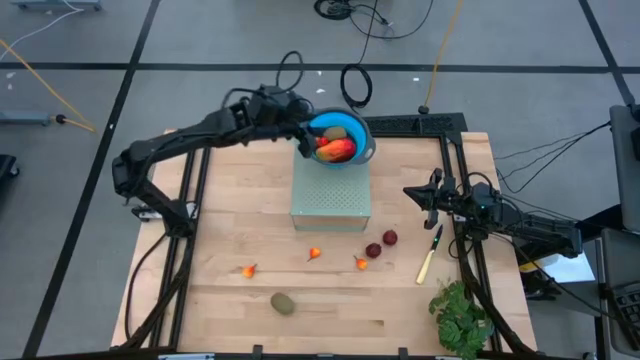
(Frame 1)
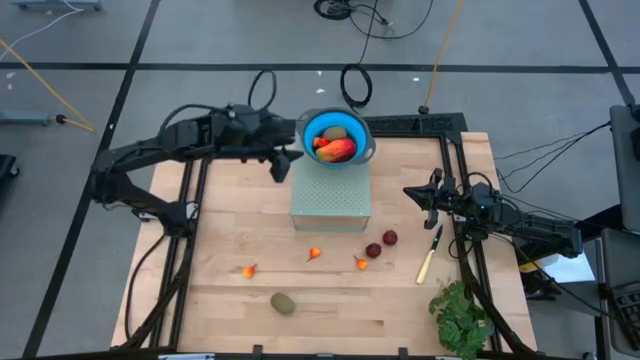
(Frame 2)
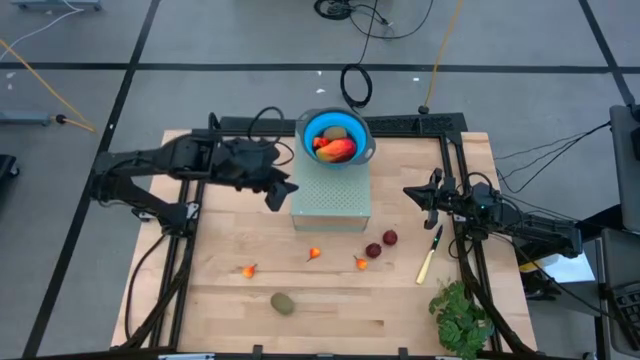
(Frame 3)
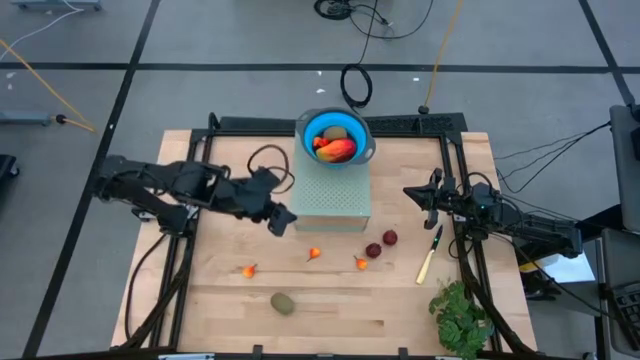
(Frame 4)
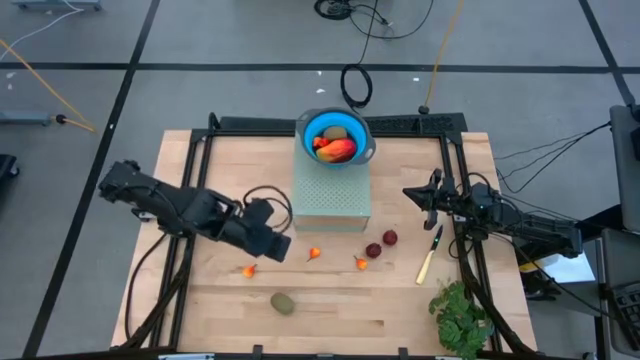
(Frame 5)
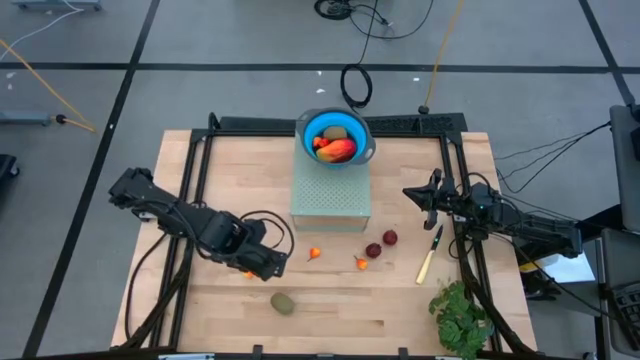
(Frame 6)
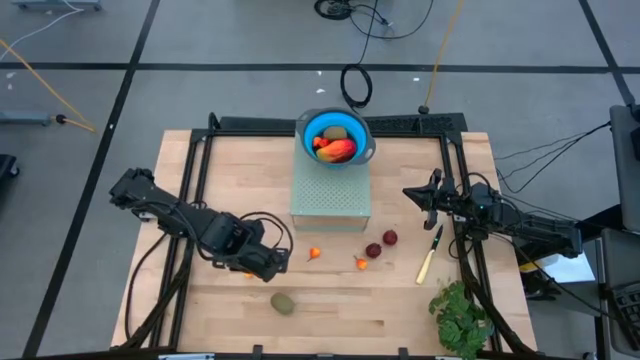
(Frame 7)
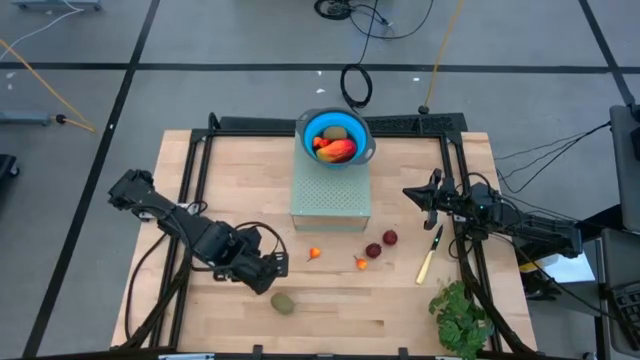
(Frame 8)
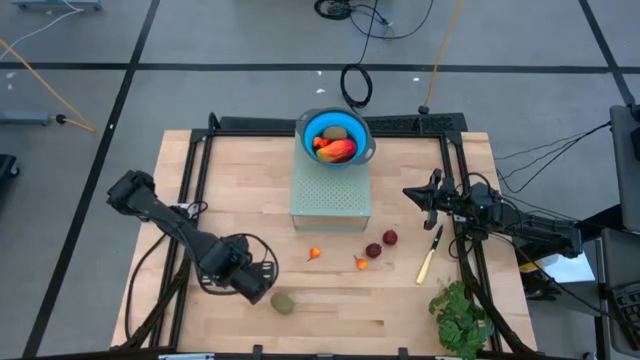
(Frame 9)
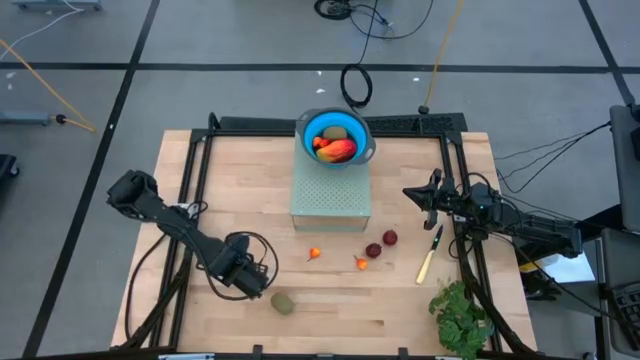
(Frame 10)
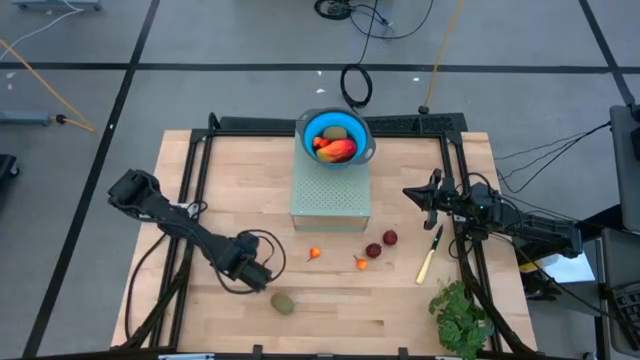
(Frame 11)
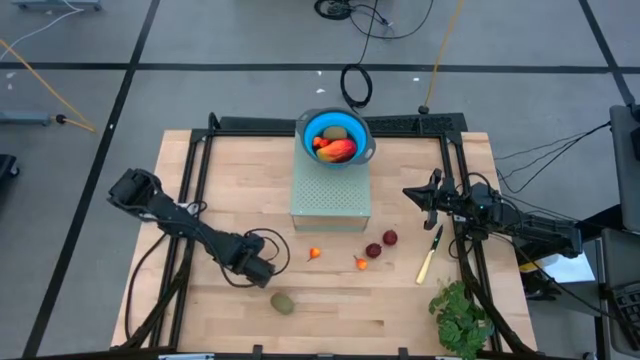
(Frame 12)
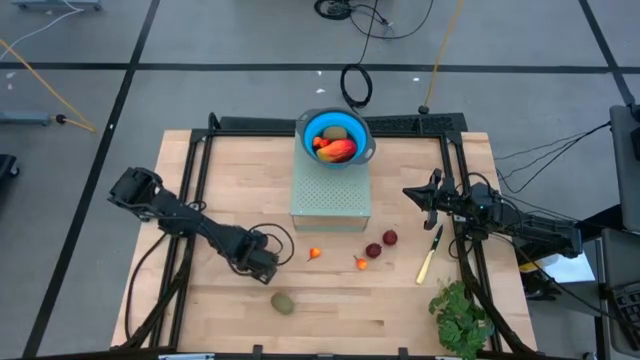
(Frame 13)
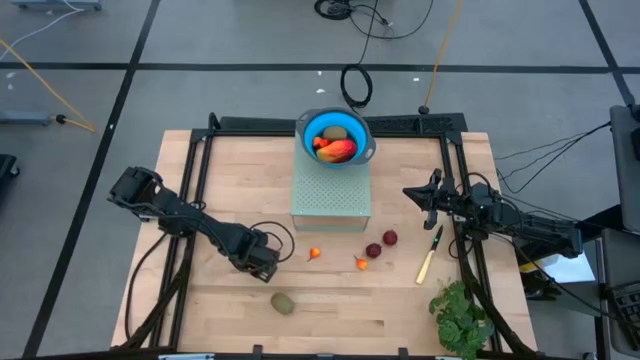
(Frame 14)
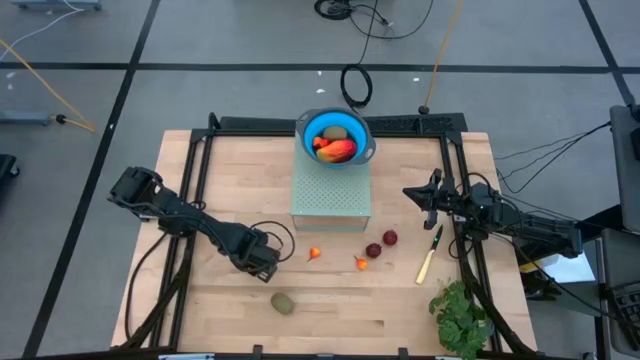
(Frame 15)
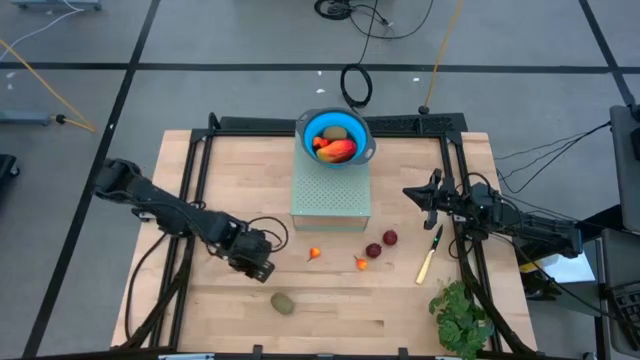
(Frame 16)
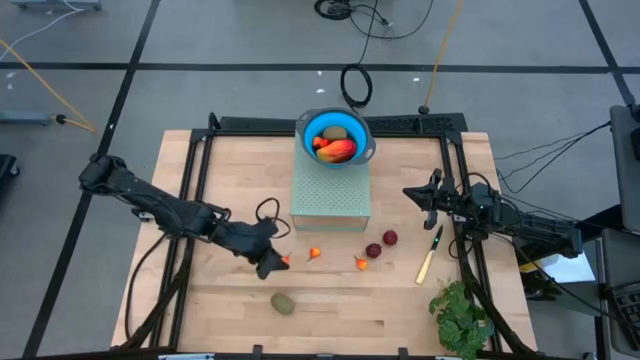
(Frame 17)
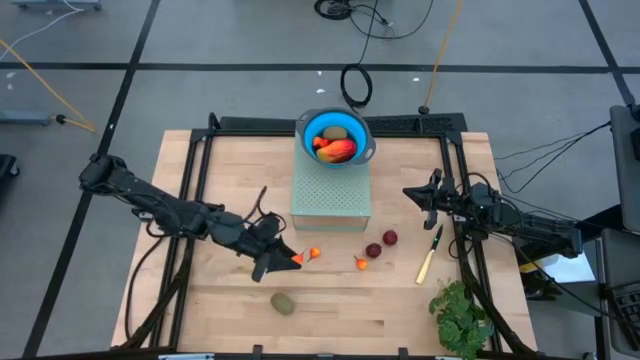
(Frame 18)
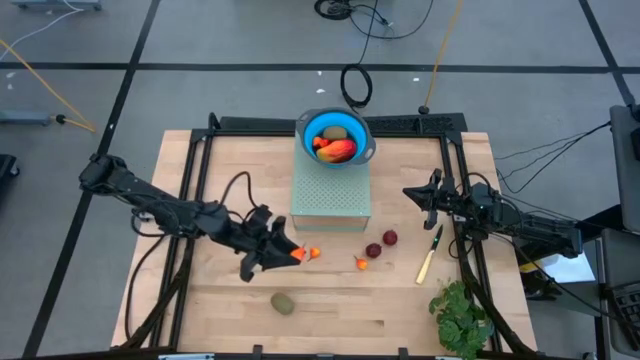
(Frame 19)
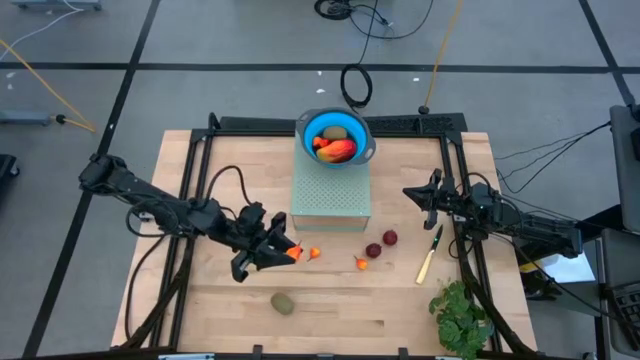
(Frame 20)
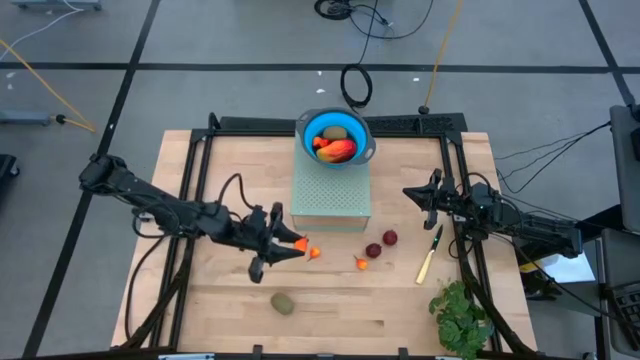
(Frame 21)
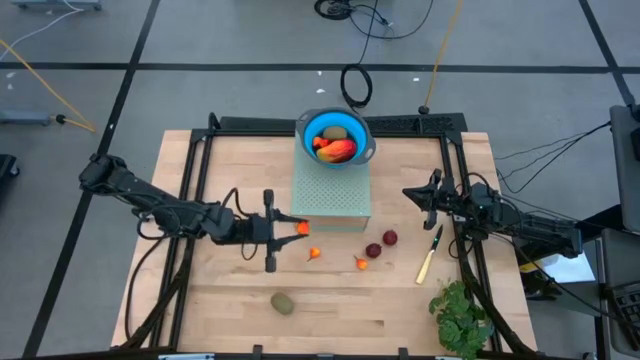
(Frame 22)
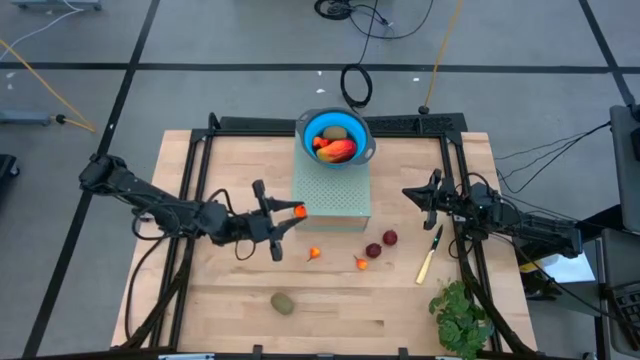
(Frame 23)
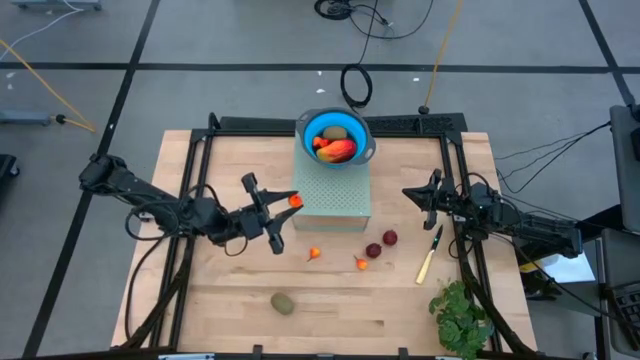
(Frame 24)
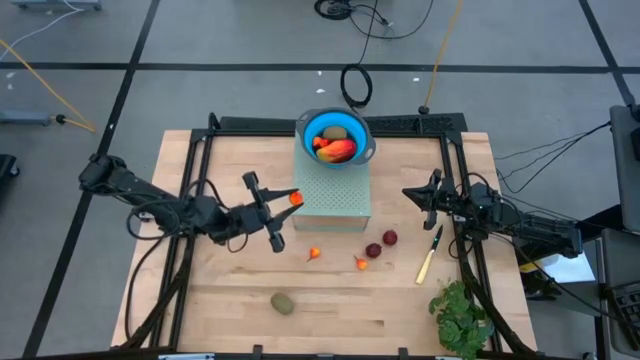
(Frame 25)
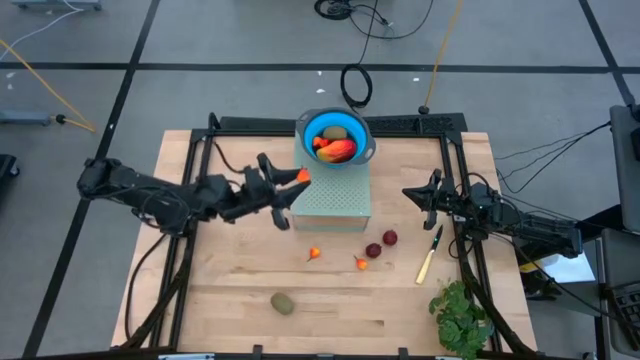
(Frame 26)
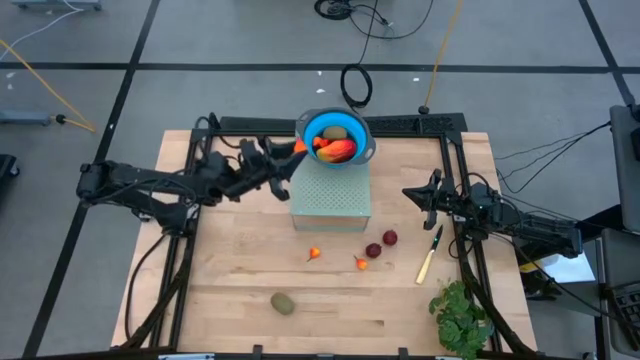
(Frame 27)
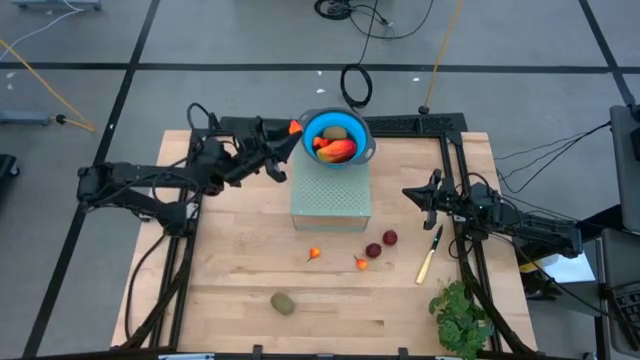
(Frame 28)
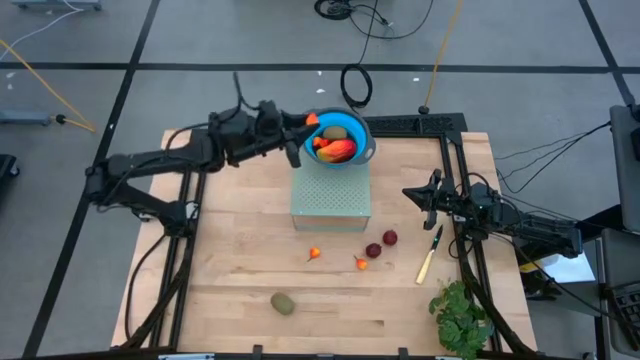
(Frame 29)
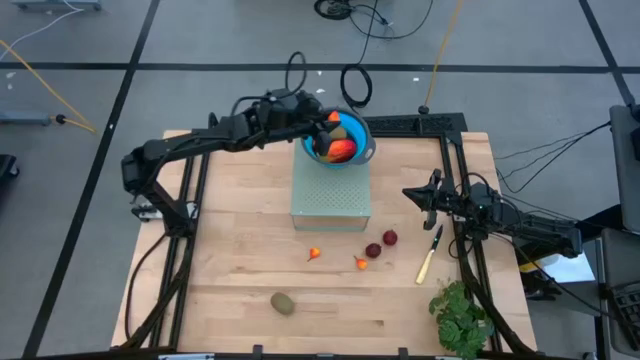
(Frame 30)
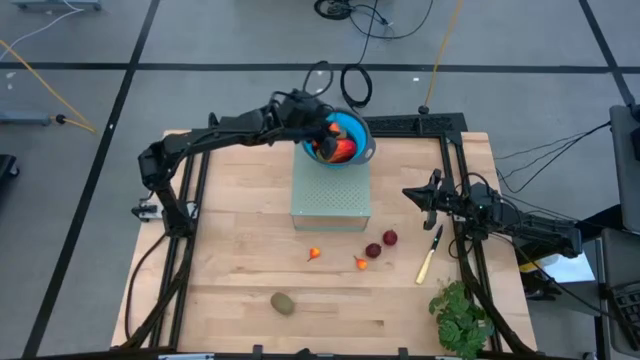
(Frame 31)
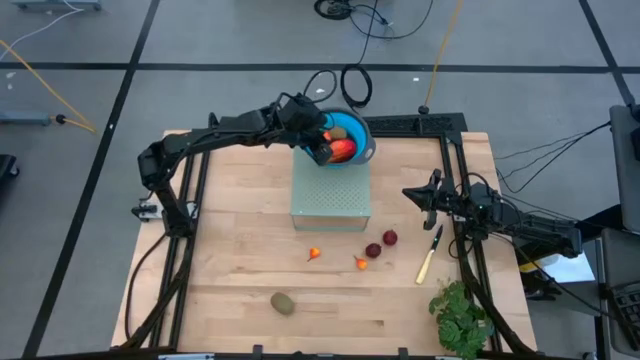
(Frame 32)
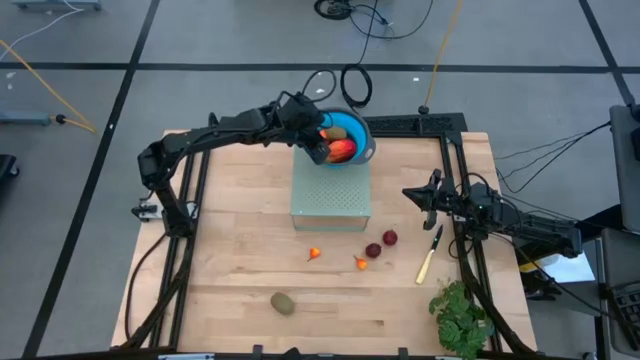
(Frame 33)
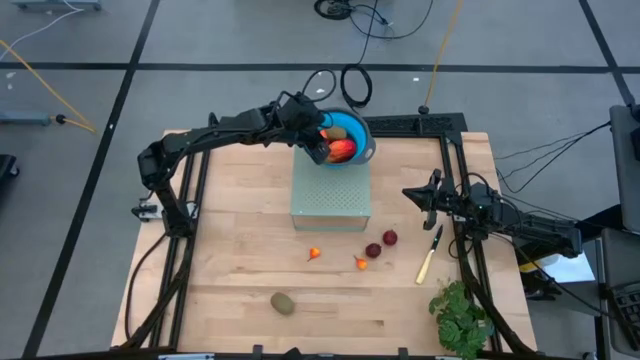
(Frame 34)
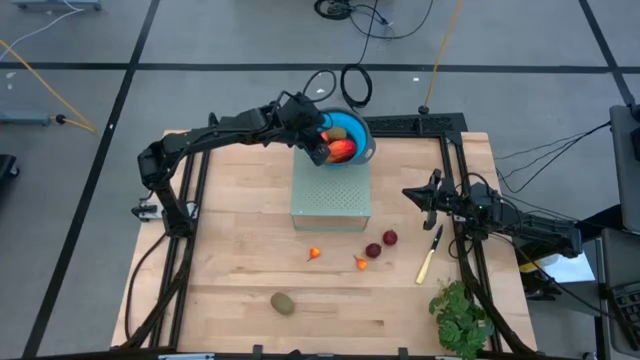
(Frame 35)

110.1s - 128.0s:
Task: Pick & Place Fruit
Put the pear into the blue strainer bowl on the shelf

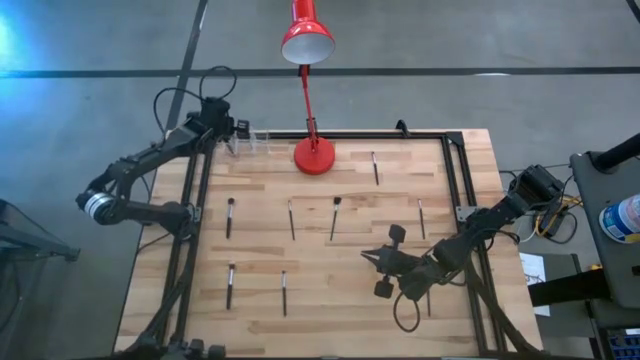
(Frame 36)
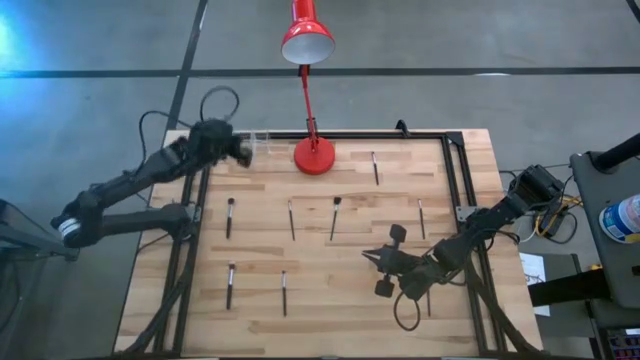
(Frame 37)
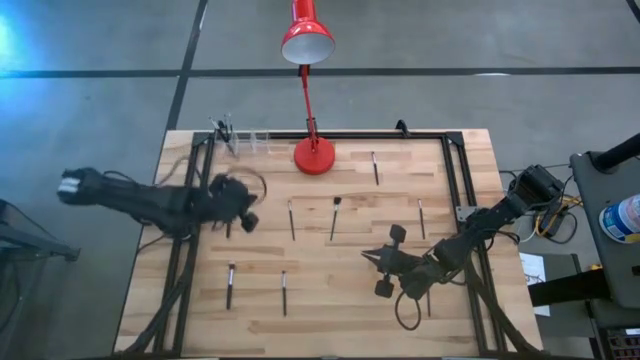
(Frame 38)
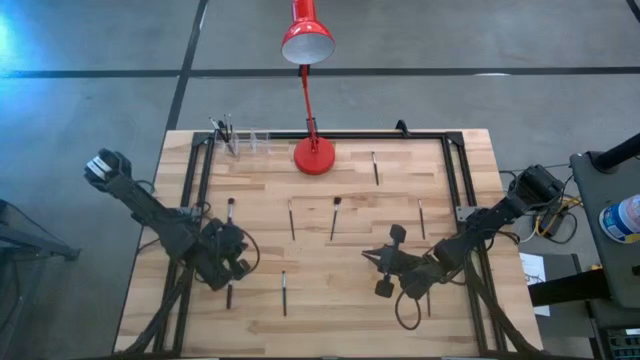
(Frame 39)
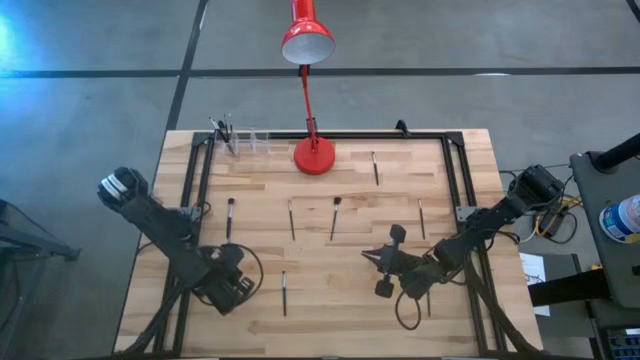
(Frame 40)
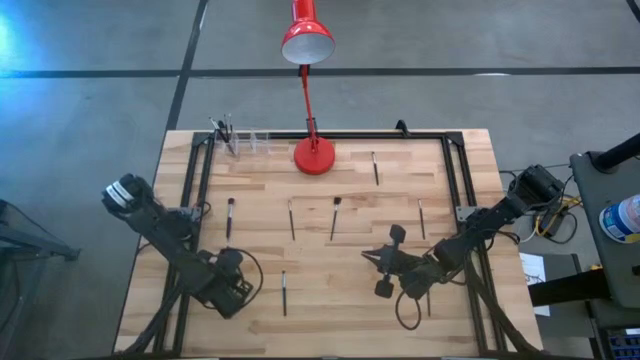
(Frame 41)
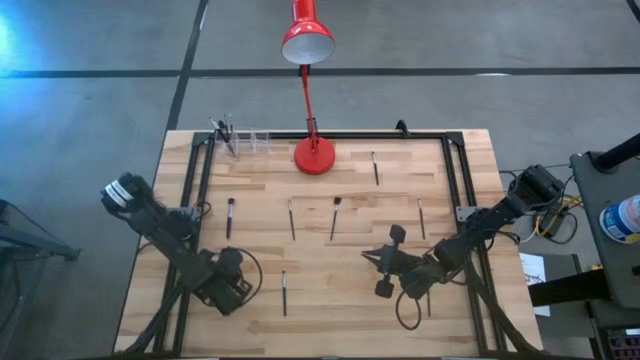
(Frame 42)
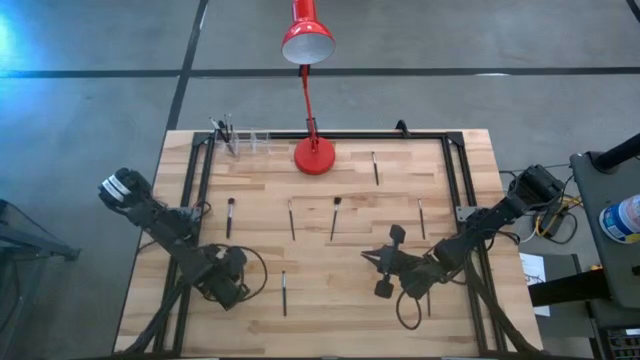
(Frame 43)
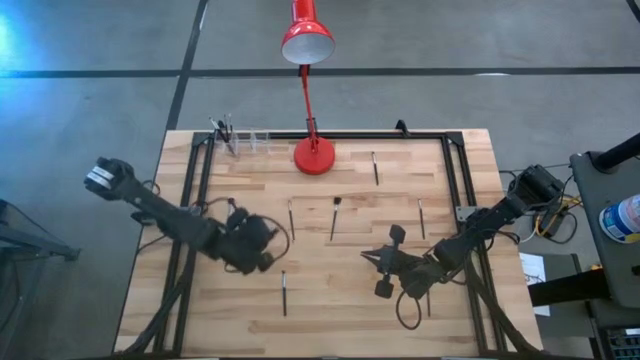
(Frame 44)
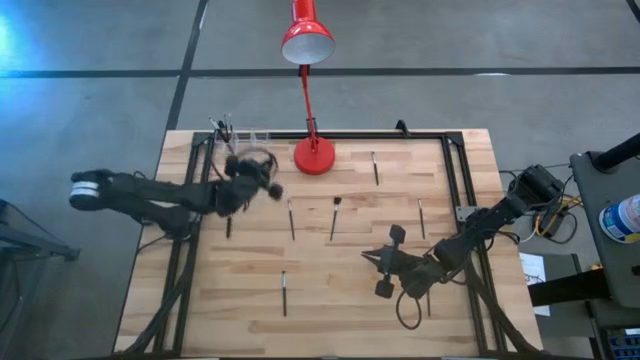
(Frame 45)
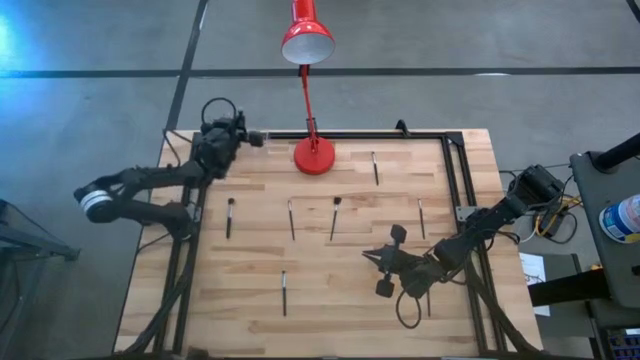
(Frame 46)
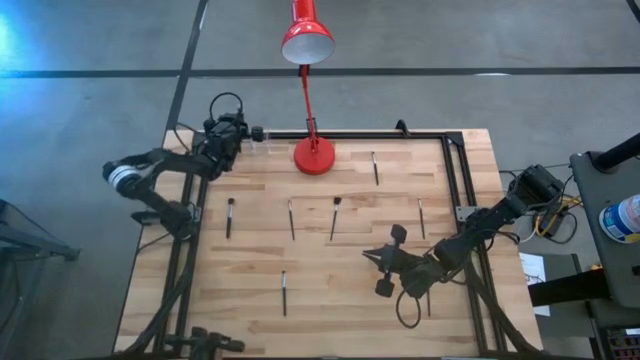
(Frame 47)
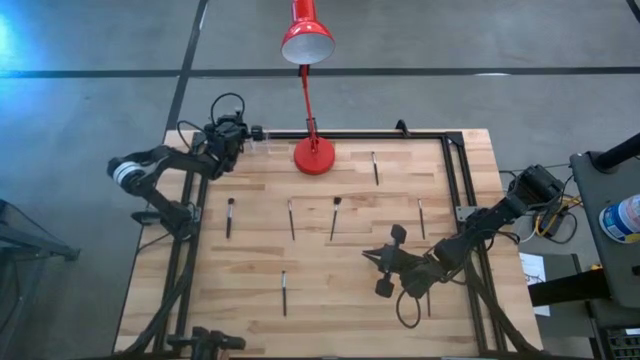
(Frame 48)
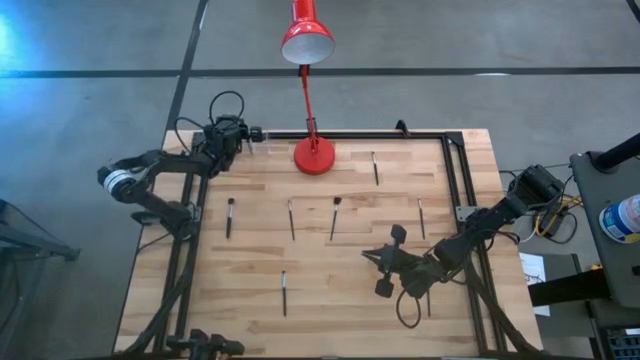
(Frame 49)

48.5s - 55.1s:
Task: Pick & Place Makeup Supplies
Put the makeup brush into the transparent organizer
